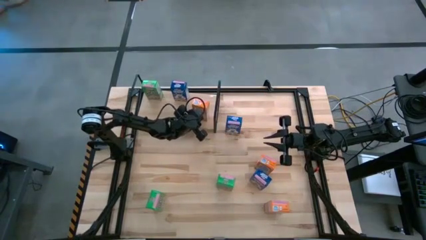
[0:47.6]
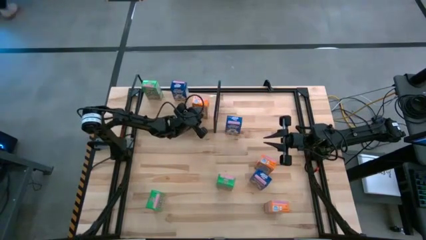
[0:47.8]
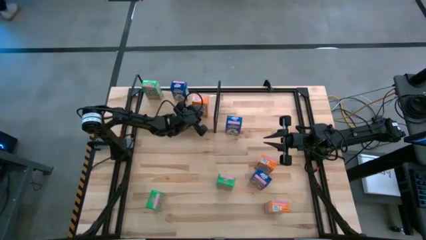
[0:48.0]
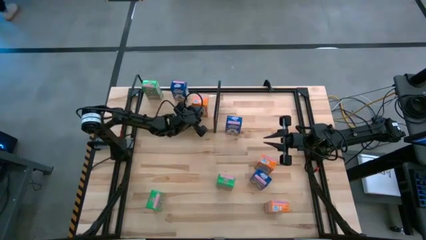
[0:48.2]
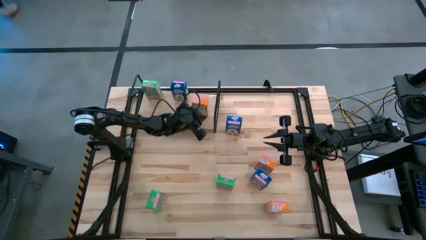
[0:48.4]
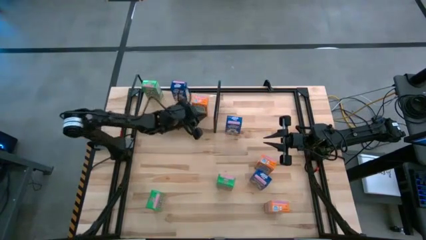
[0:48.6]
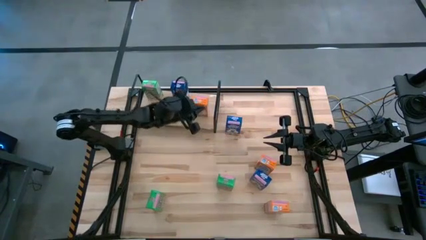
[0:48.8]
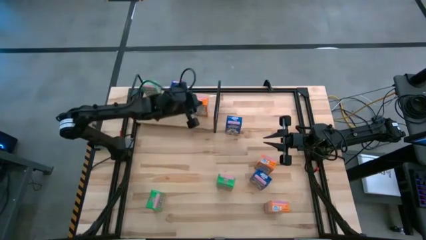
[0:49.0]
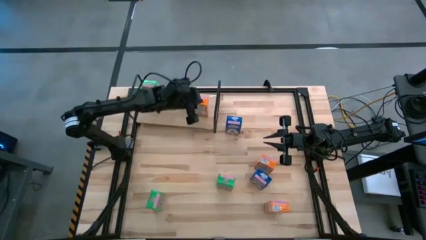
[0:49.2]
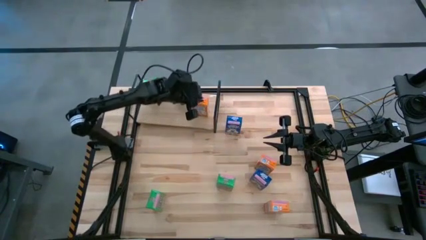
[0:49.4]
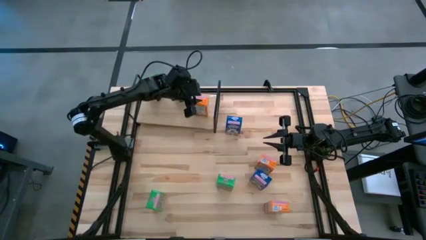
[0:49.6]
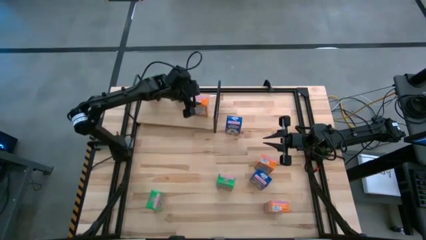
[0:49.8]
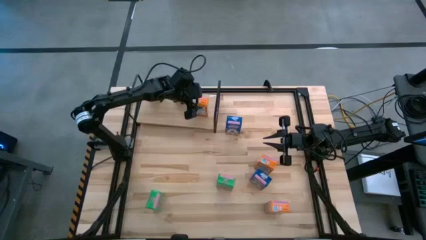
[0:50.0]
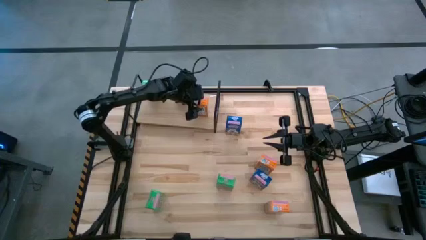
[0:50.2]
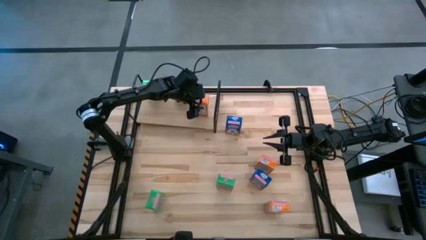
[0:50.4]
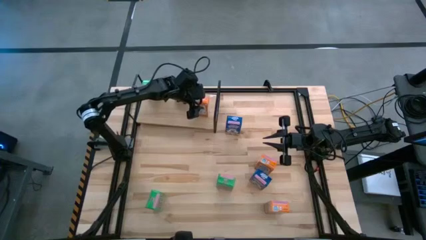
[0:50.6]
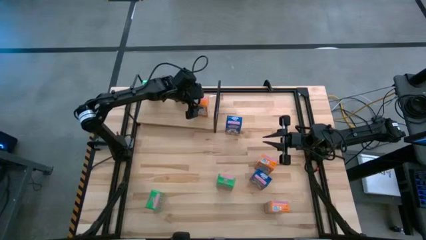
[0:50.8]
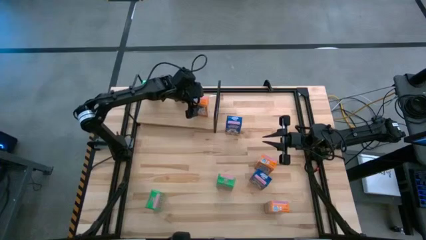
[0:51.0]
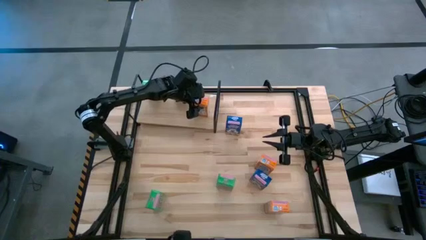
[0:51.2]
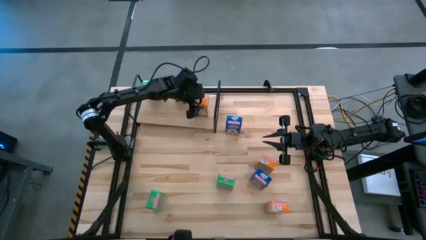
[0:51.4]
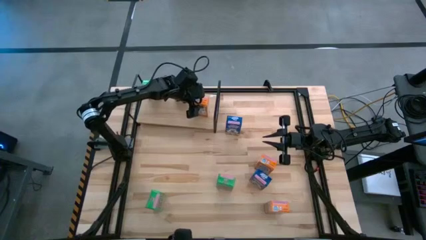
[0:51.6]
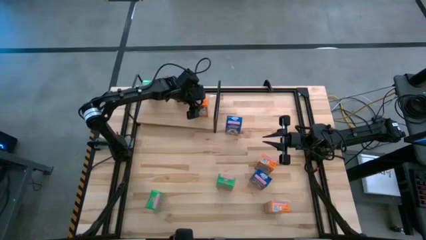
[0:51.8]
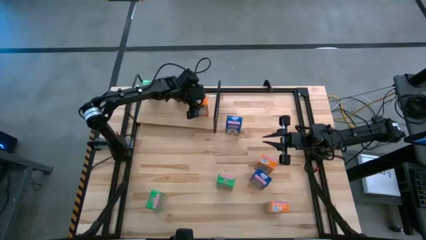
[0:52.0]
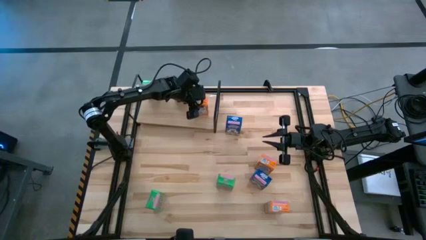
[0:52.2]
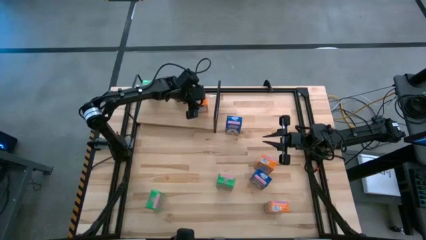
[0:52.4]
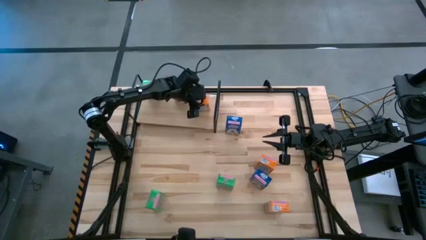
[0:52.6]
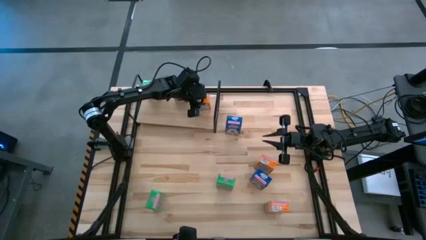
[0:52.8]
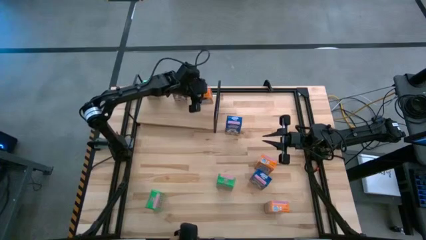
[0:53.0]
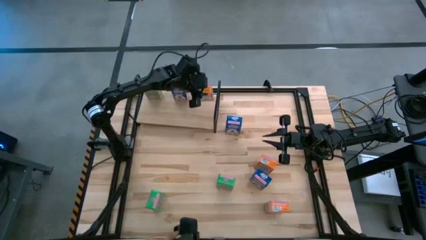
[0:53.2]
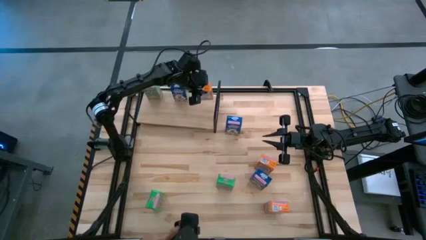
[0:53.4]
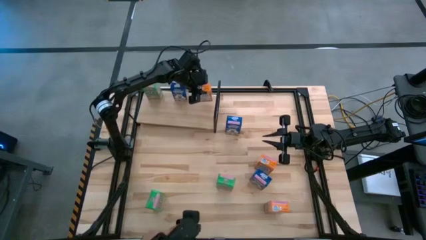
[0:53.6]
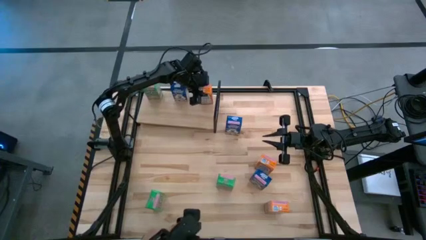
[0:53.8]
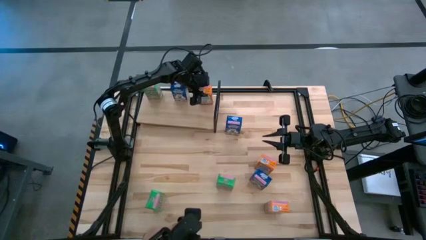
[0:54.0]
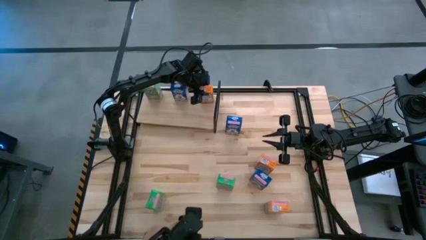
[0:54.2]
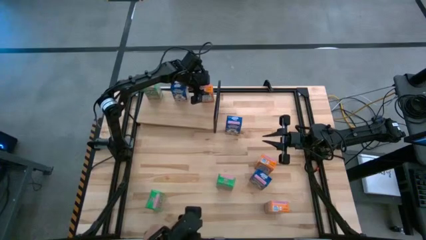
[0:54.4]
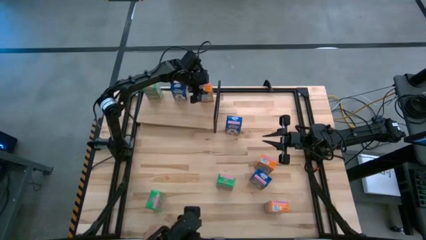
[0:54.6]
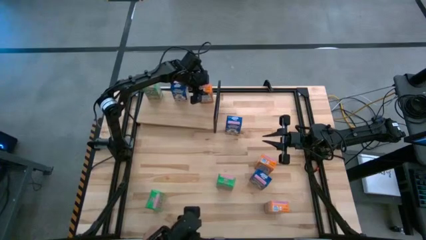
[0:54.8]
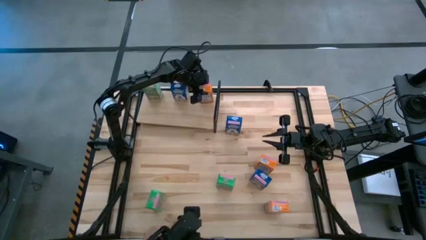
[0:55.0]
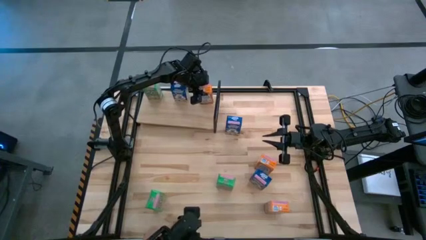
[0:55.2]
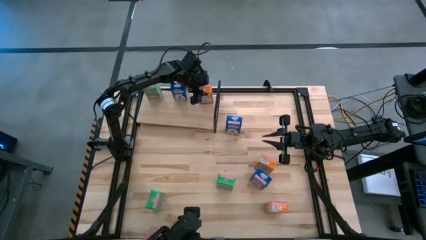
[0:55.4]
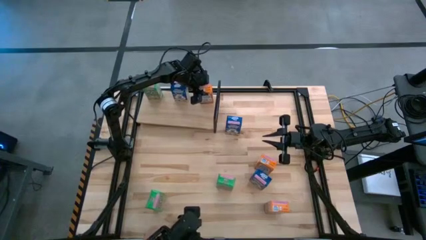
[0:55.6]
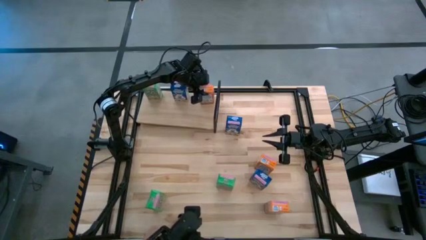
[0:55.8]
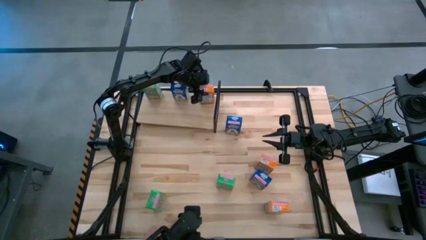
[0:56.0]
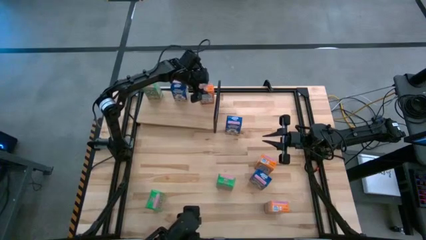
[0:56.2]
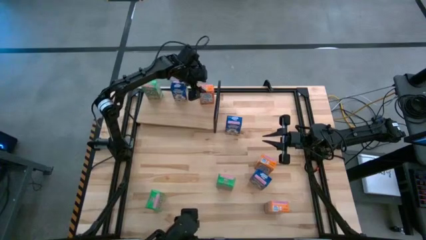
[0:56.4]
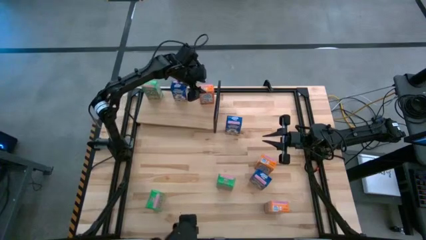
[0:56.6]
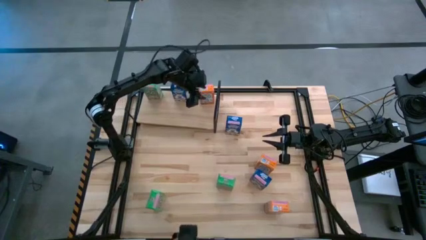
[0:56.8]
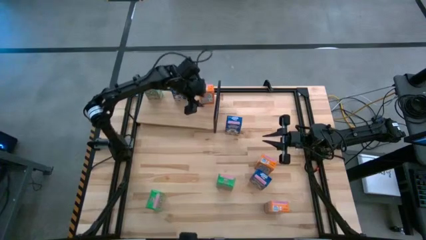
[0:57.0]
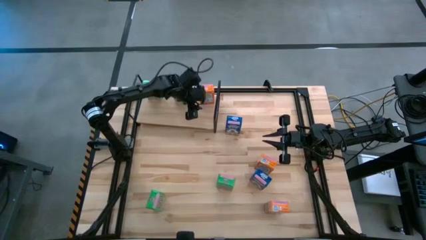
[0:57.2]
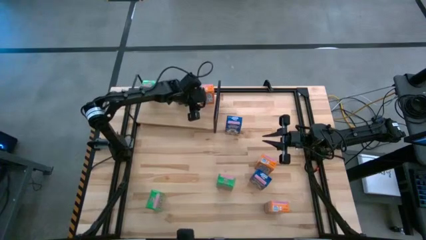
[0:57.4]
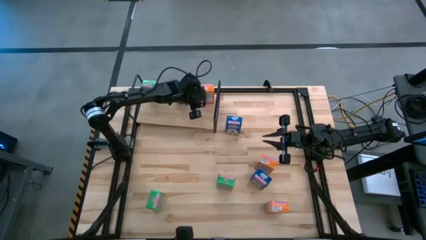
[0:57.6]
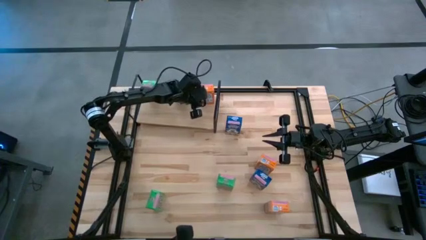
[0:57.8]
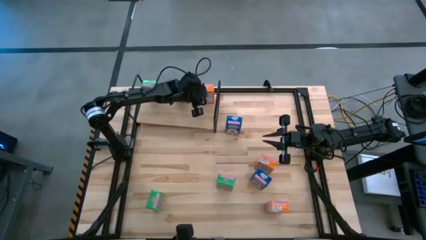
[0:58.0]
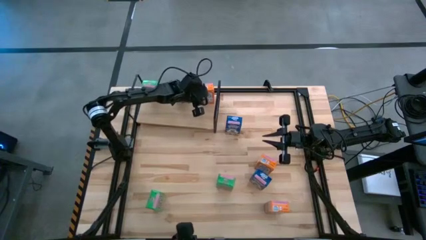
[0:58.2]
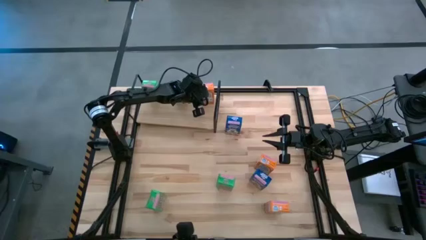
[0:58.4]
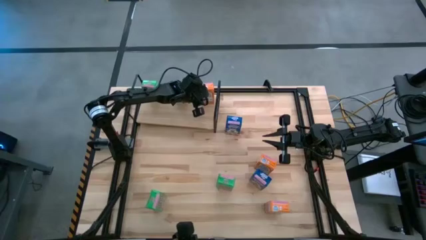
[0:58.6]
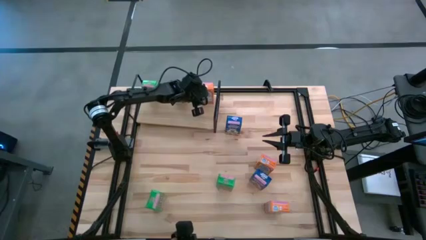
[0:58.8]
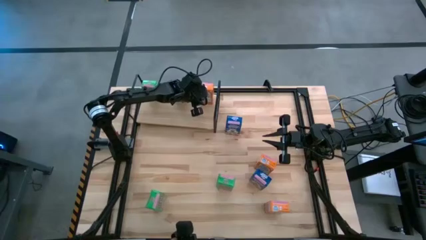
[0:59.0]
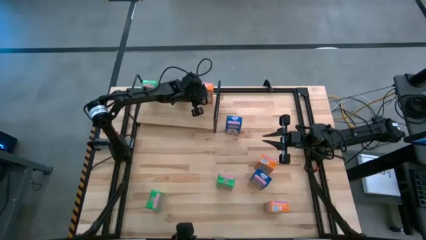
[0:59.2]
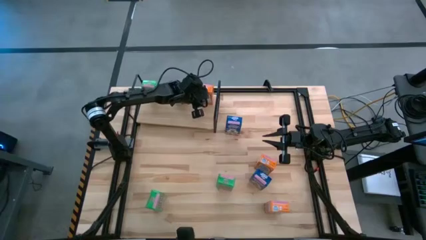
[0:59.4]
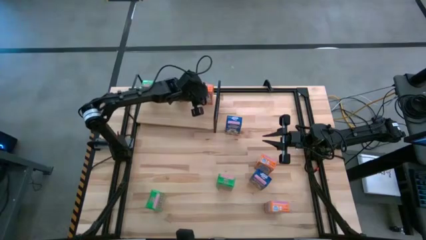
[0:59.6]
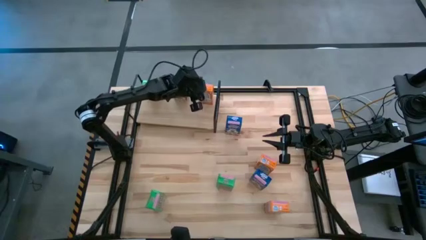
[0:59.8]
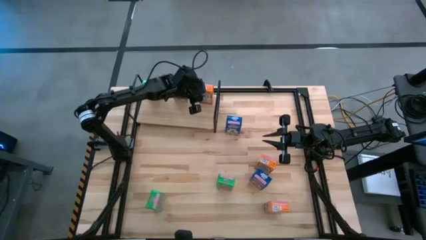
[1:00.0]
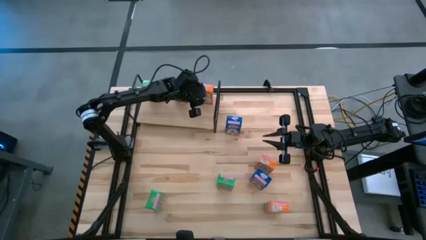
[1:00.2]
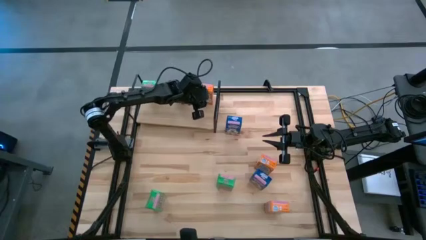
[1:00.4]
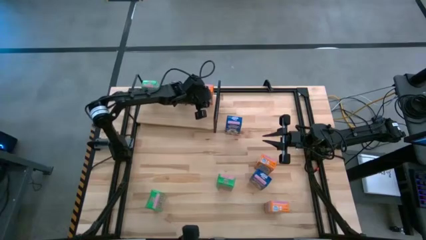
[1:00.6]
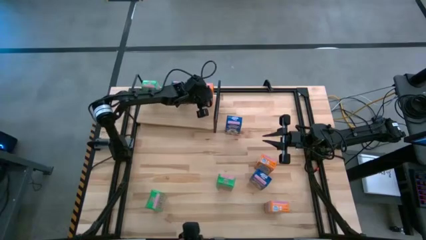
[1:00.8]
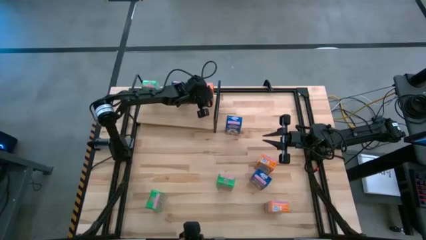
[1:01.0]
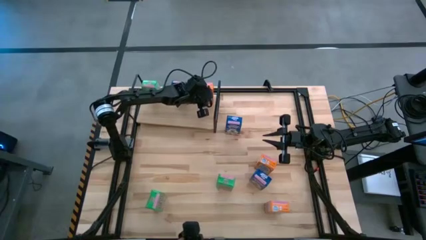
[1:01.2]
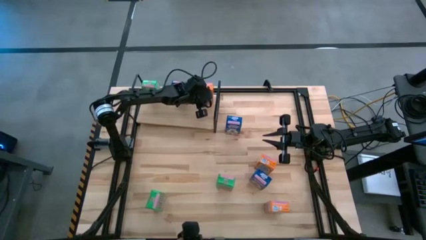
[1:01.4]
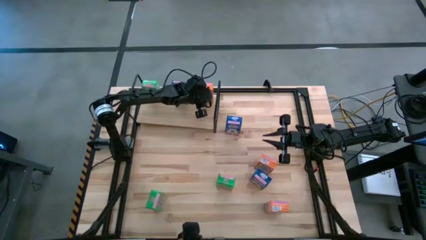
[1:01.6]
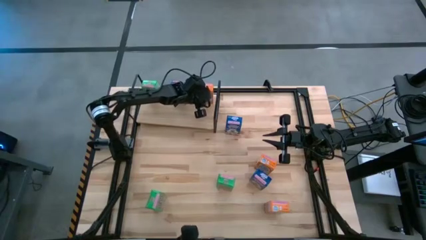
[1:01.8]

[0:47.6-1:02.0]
Task: Stack cereal on shelf
Put the top left orange cereal box on the shelf
